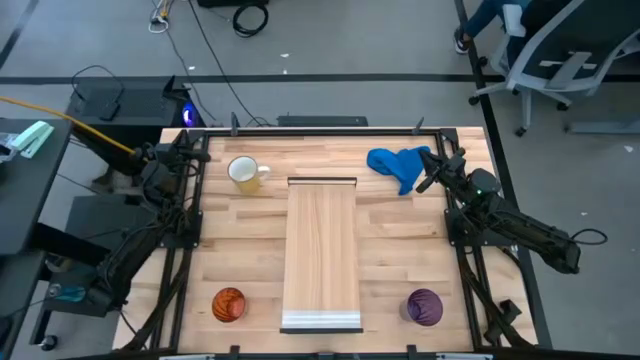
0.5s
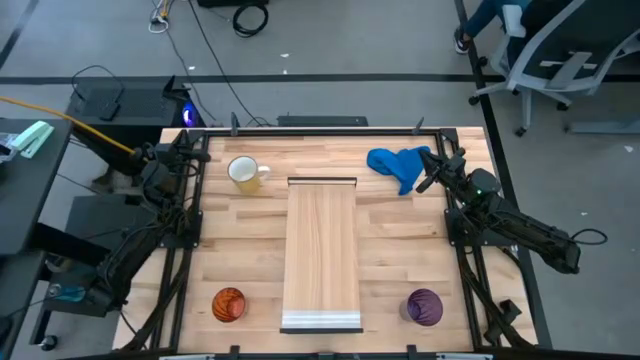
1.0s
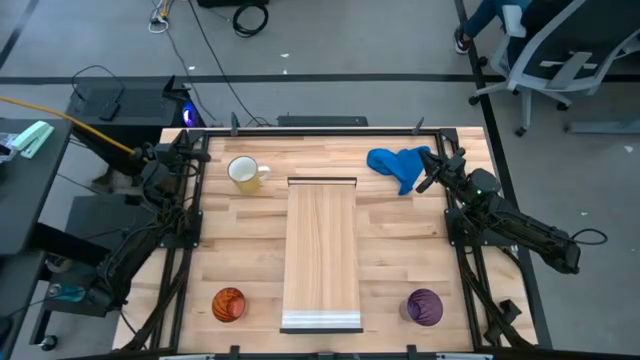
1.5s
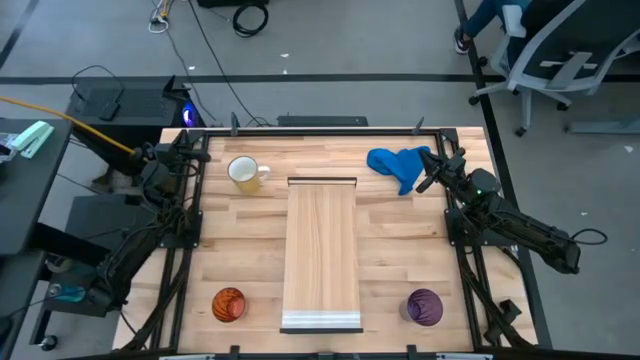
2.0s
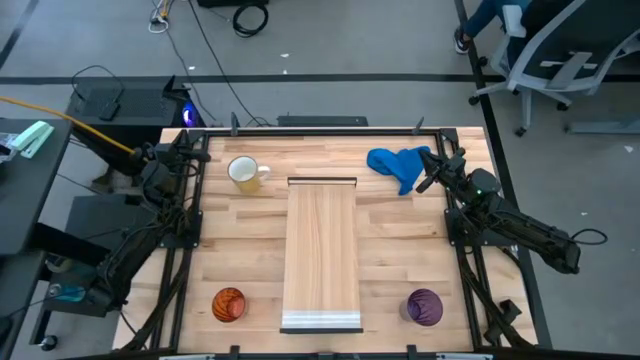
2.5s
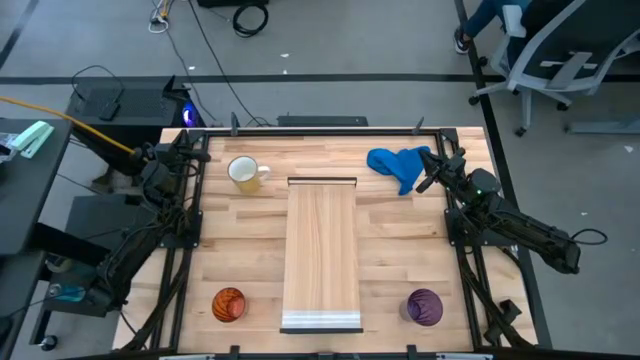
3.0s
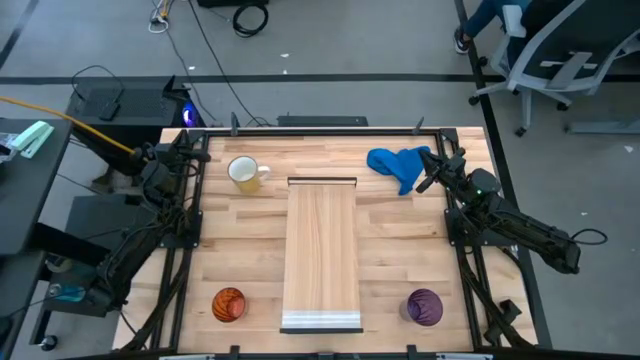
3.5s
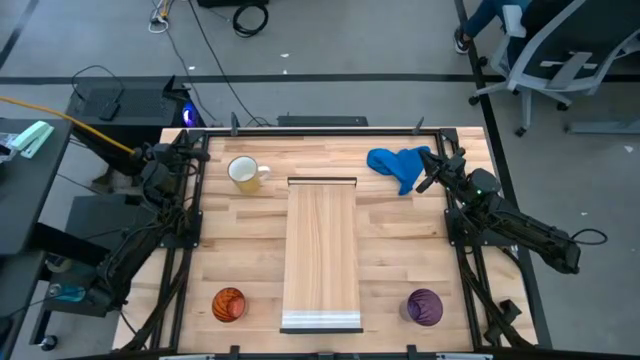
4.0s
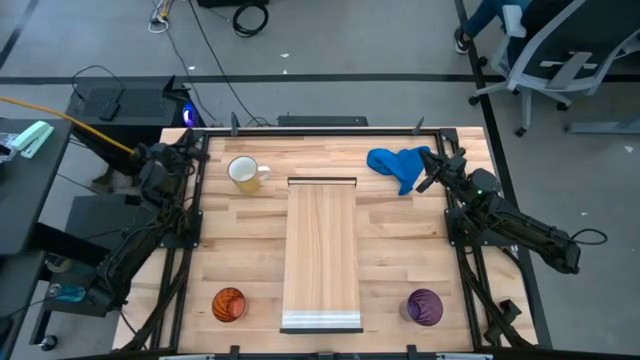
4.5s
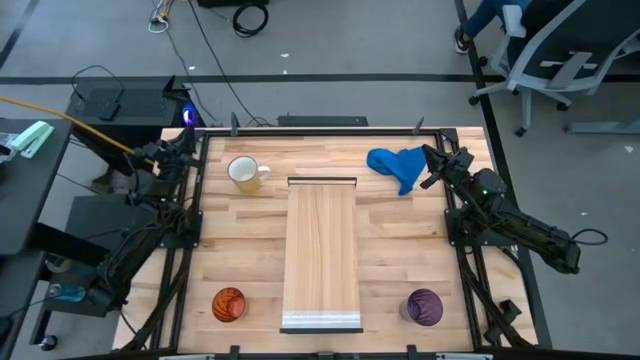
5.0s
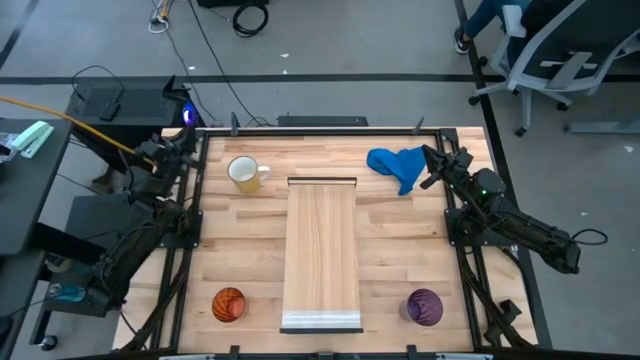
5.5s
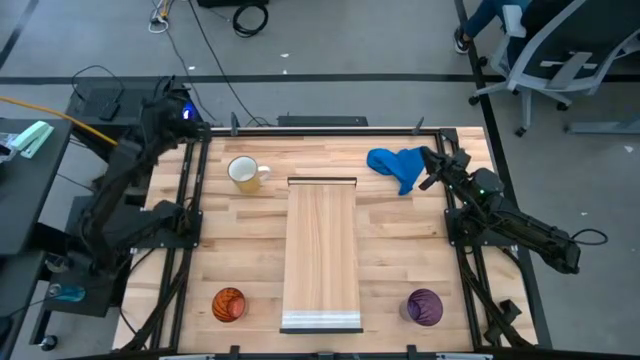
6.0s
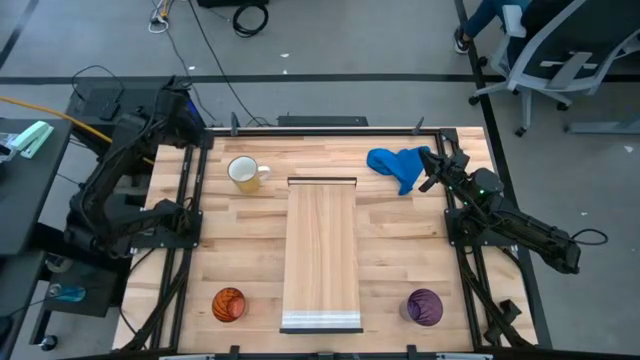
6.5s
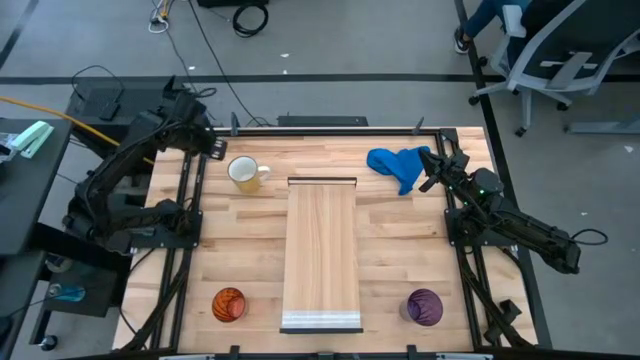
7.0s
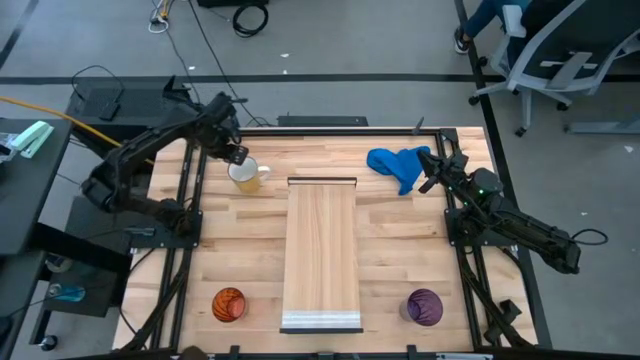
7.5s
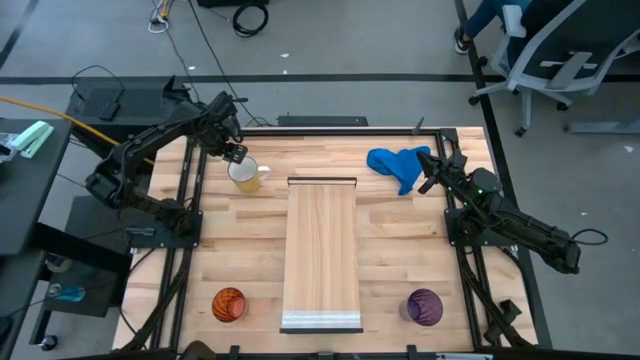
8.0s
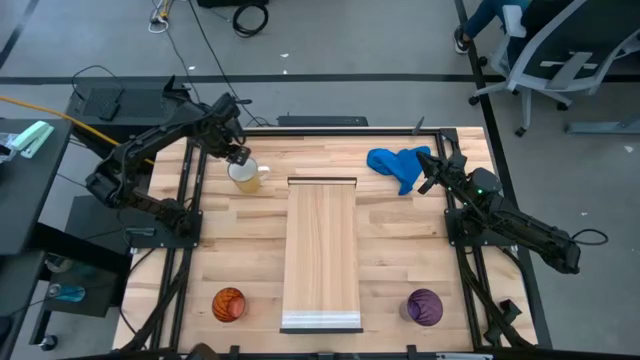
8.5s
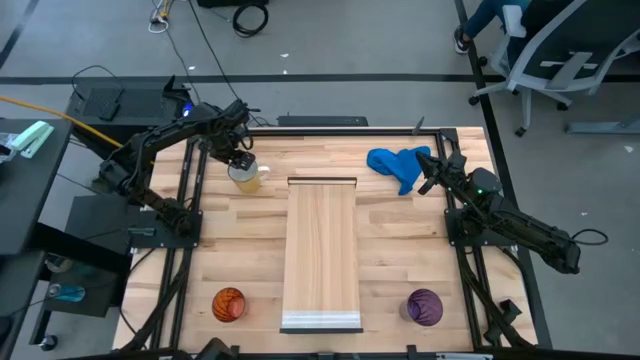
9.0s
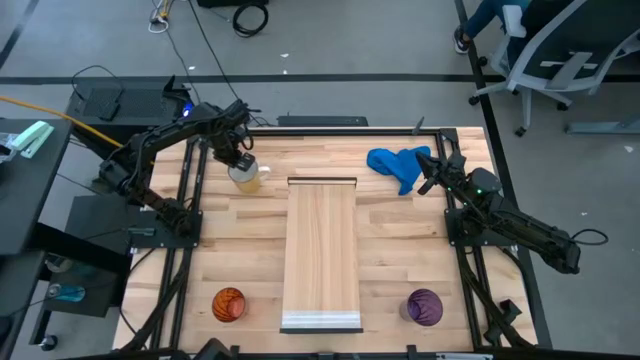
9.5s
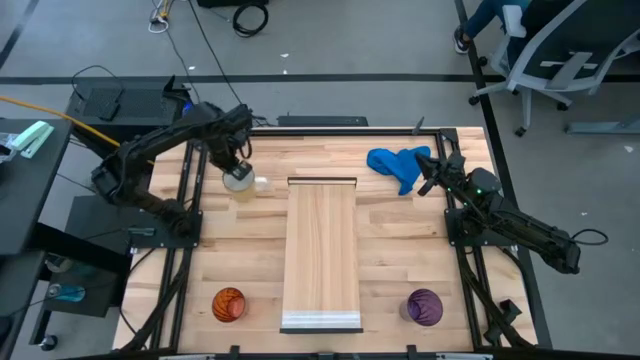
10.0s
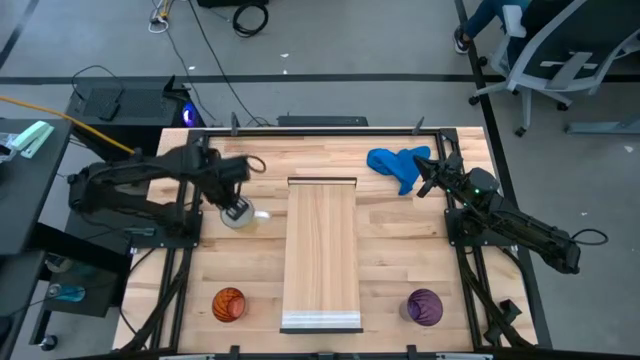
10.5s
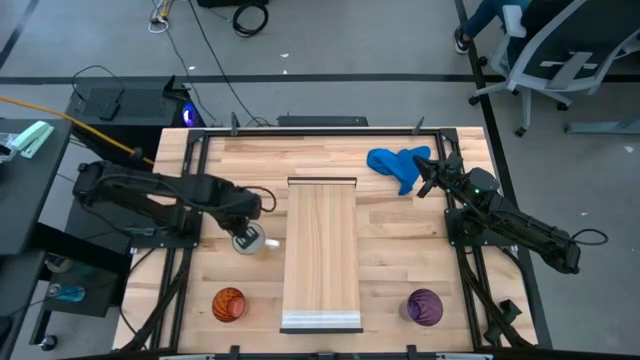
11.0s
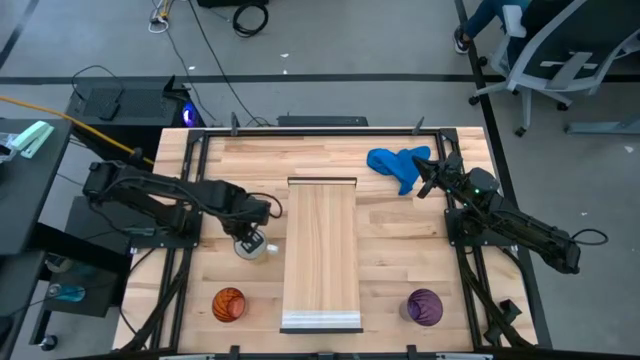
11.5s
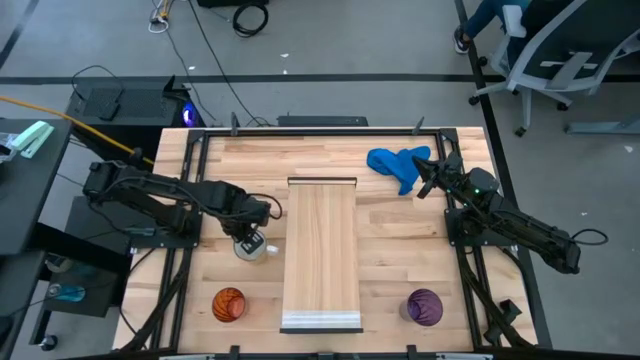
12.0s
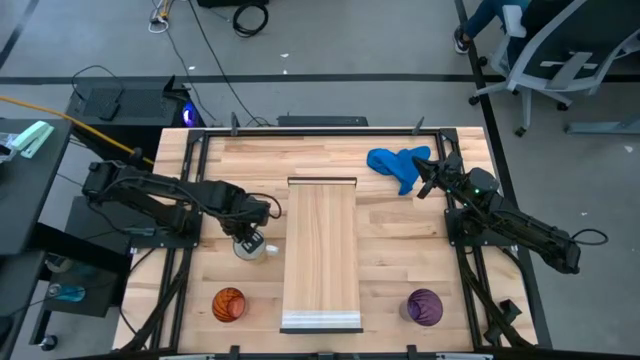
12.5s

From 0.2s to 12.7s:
Task: Stack small to large cups/mugs on shelf
Move the yellow cup to the middle left of the table

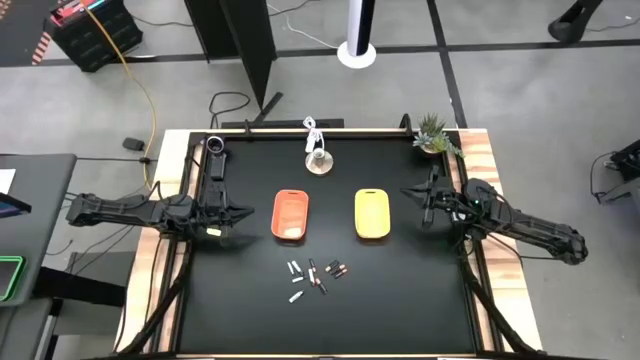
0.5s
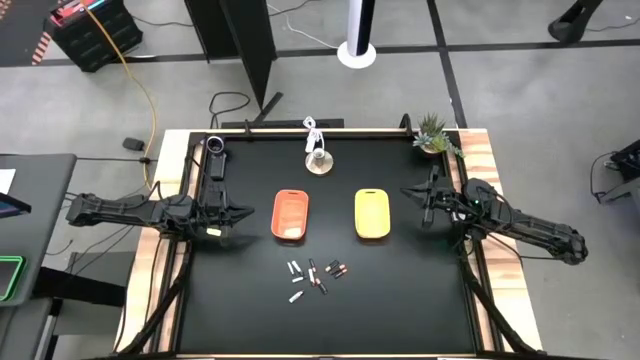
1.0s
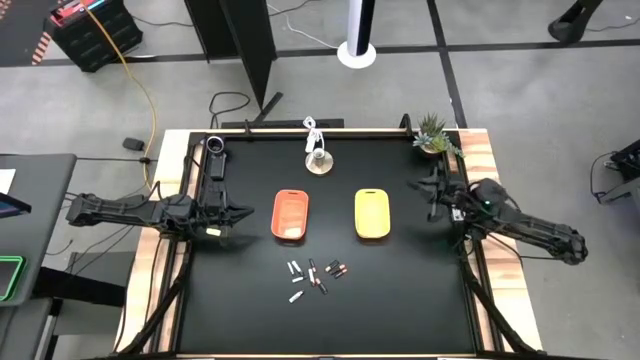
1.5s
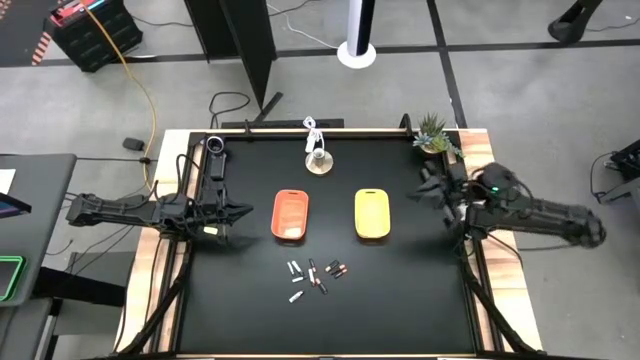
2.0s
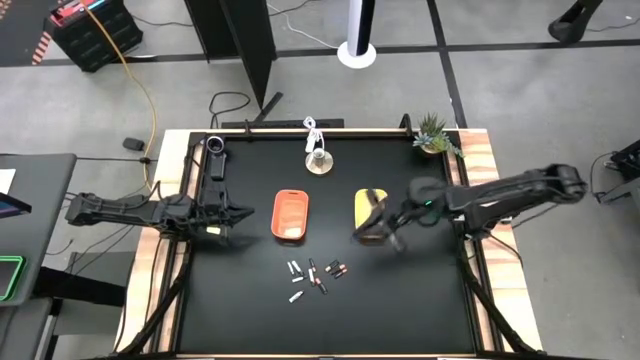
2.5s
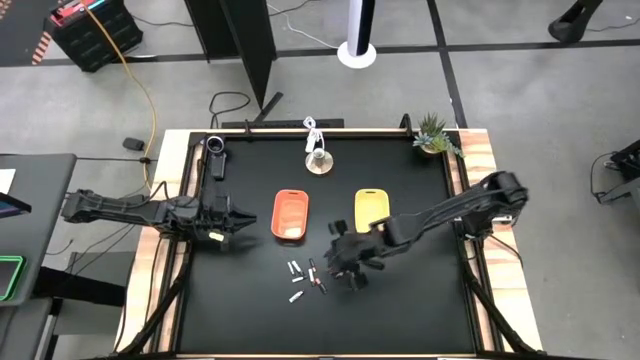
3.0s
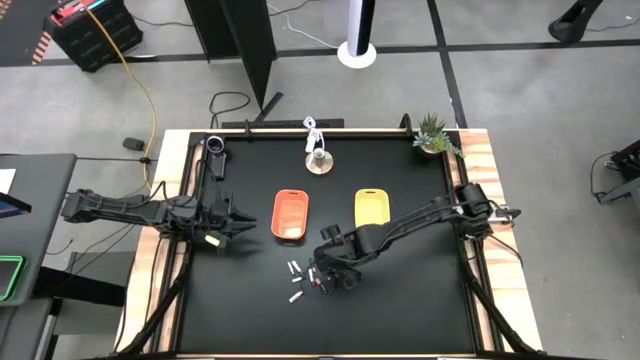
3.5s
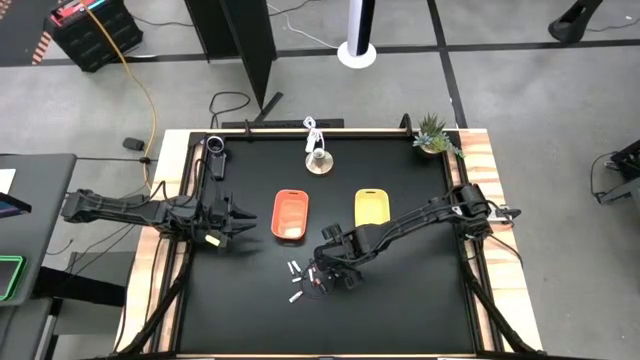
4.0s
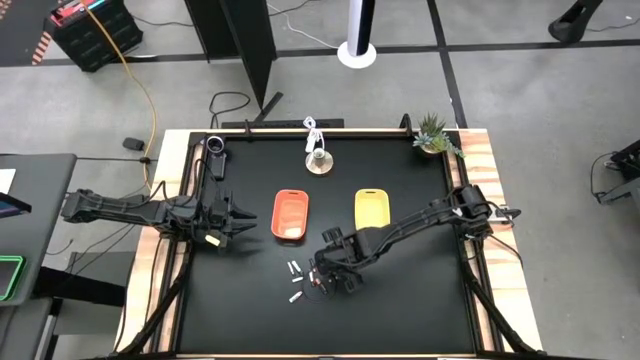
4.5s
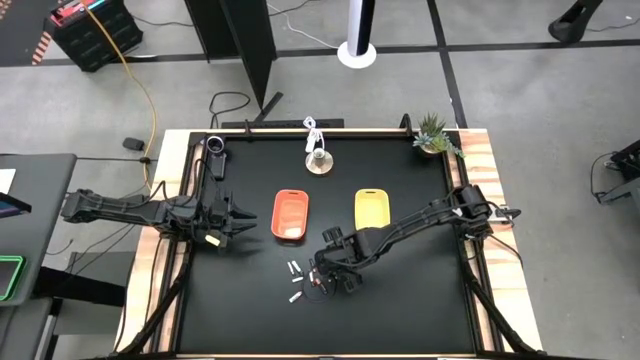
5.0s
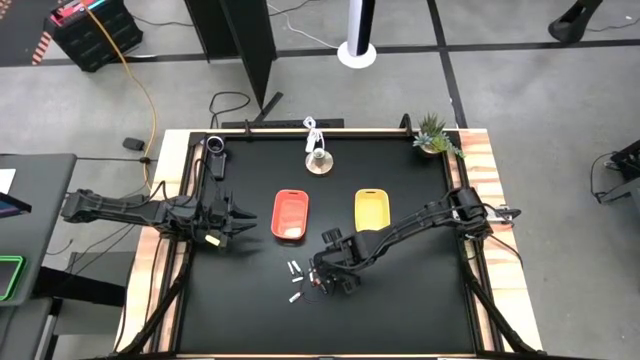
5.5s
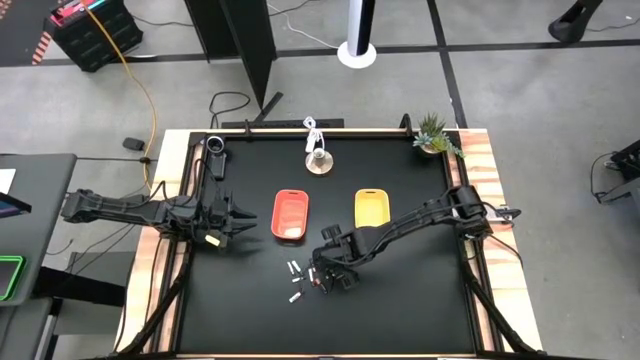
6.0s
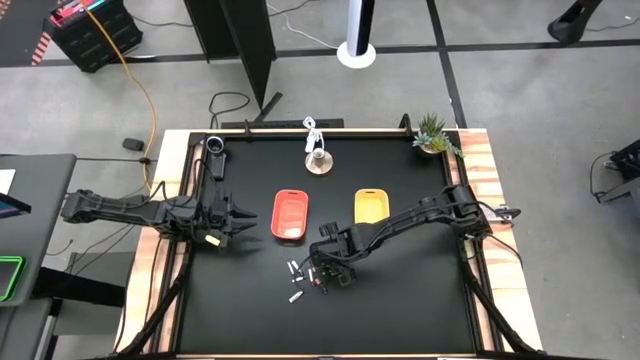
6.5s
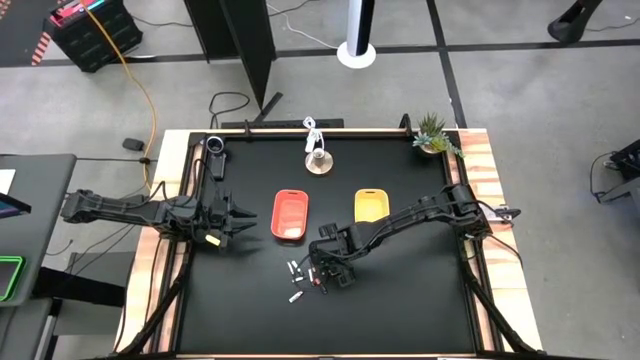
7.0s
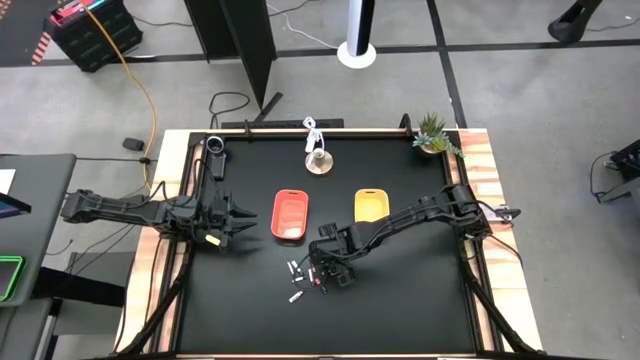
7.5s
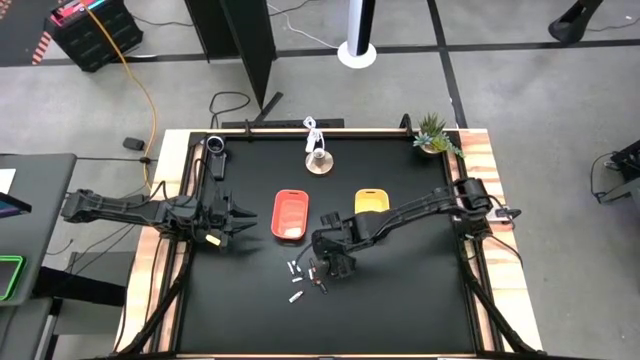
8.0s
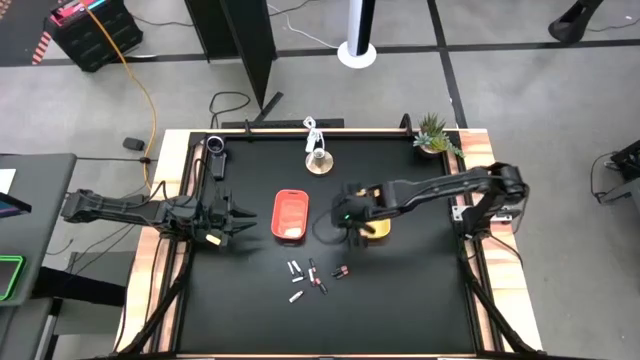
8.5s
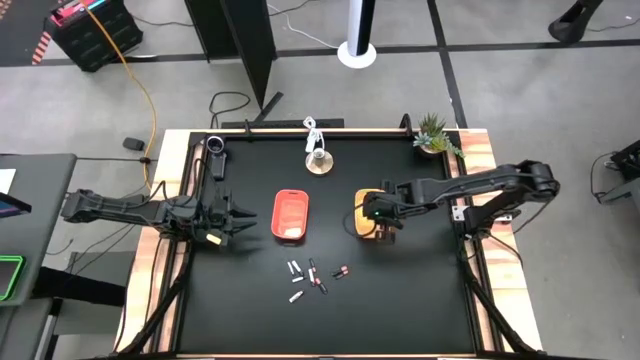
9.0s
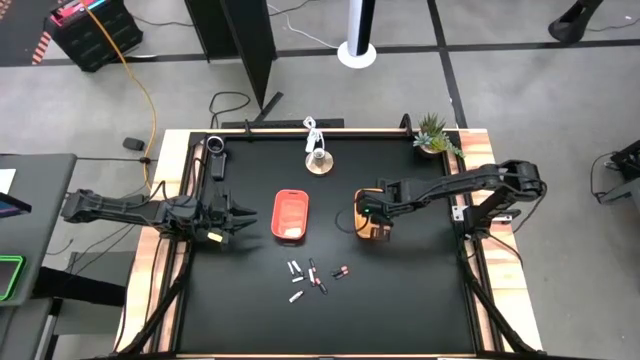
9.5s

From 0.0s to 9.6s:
Task: Sort batteries
Put the black battery into the yellow bin
